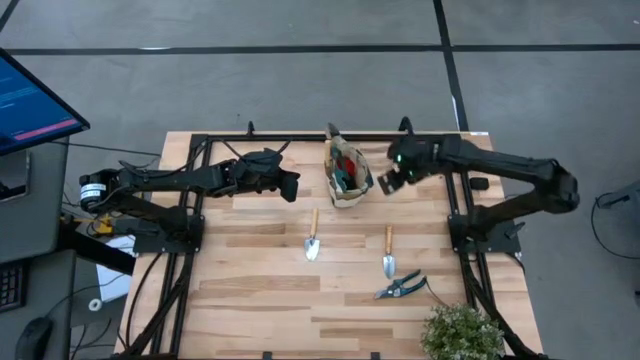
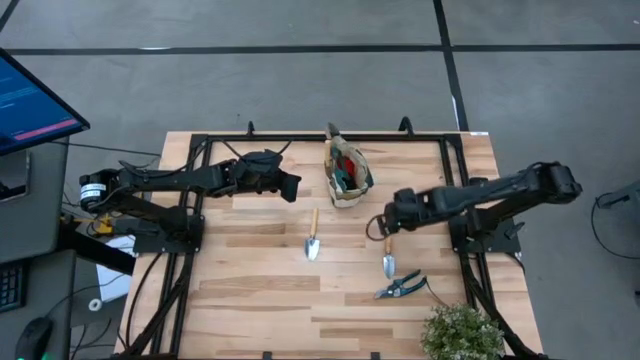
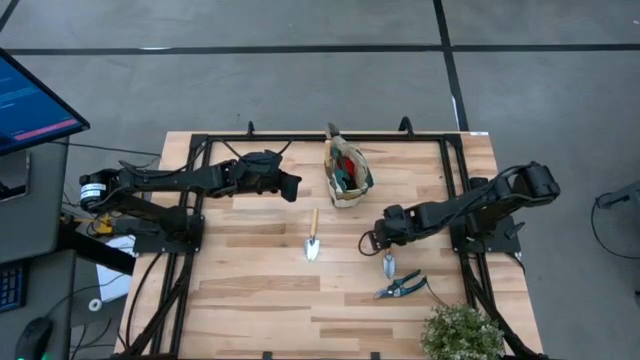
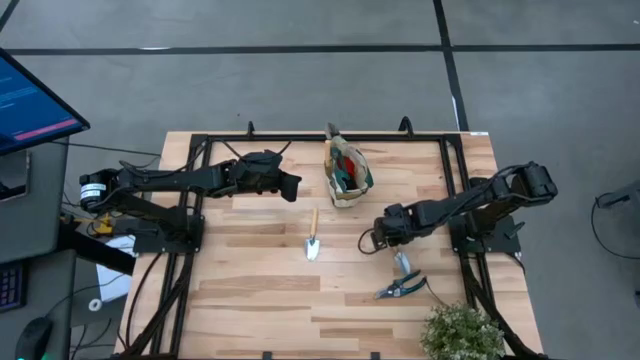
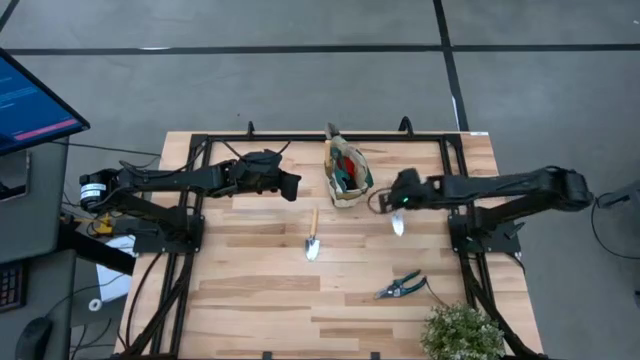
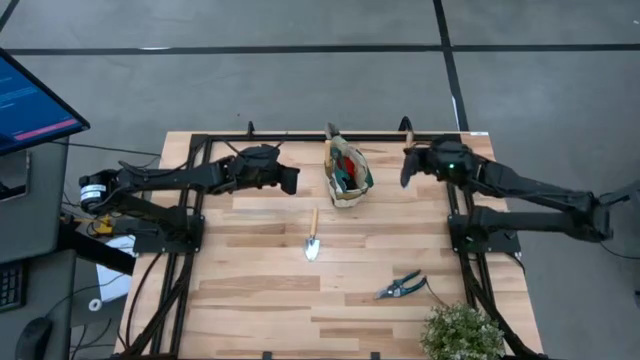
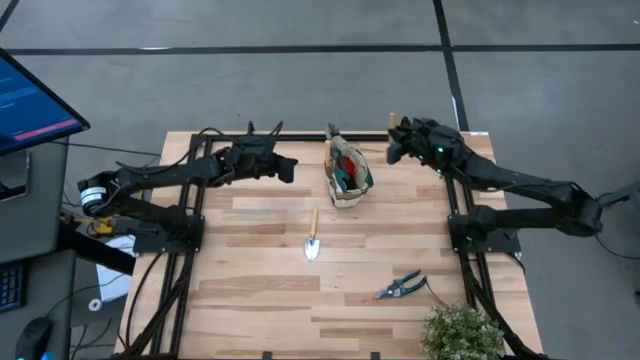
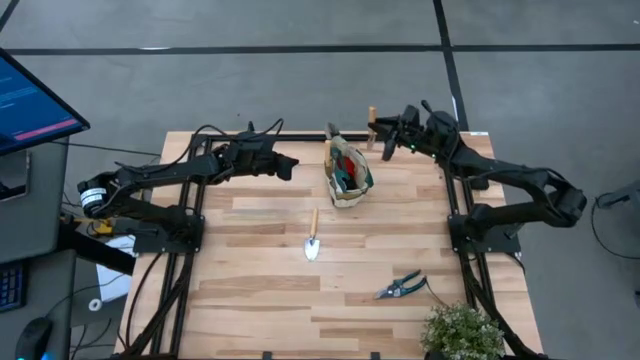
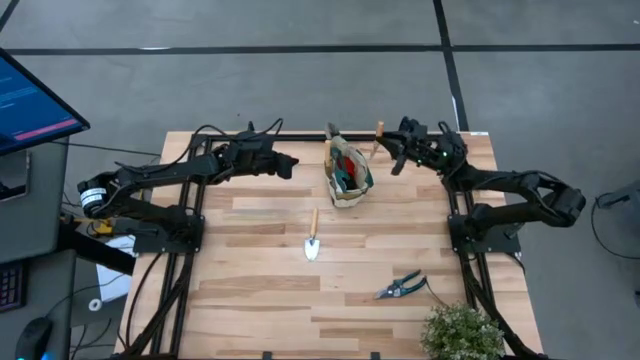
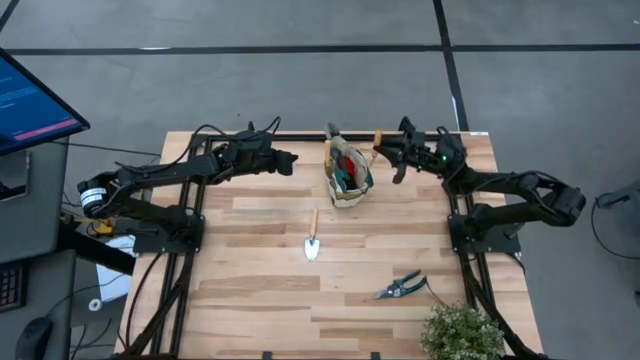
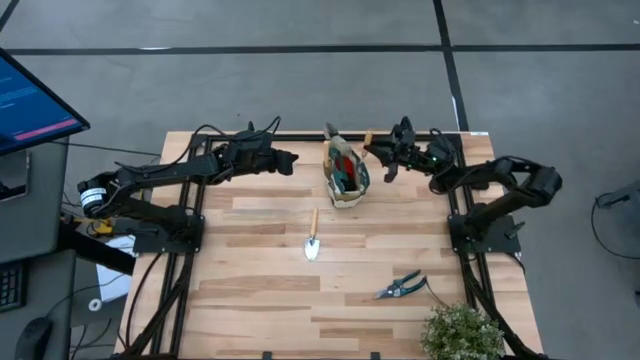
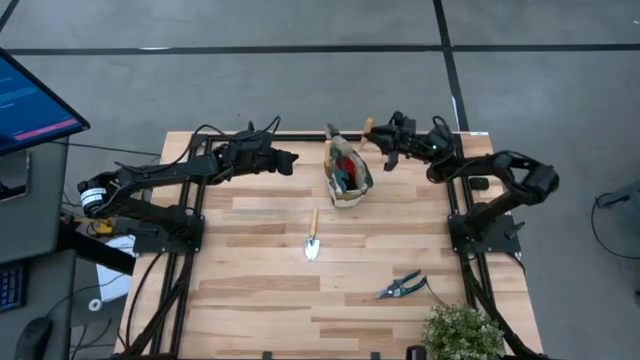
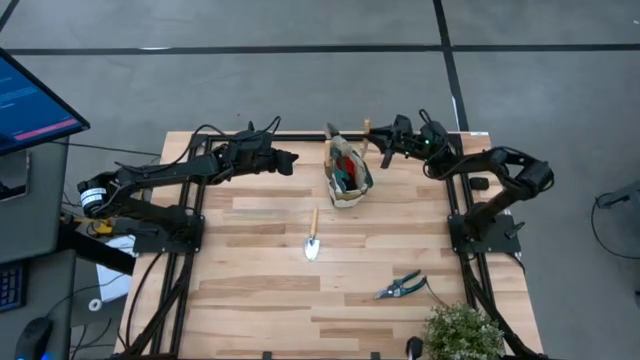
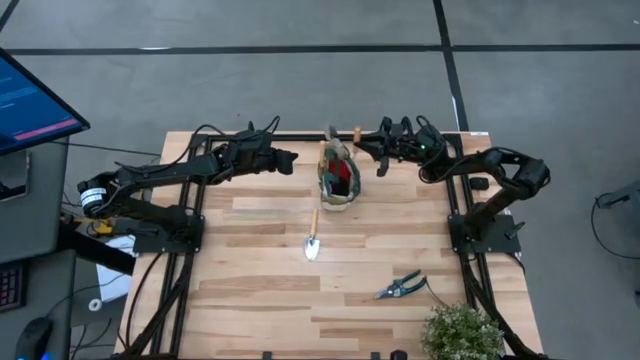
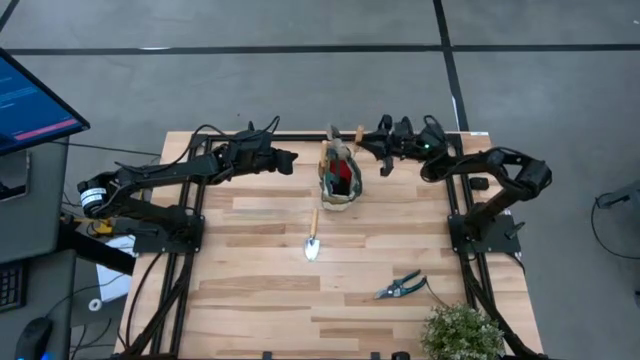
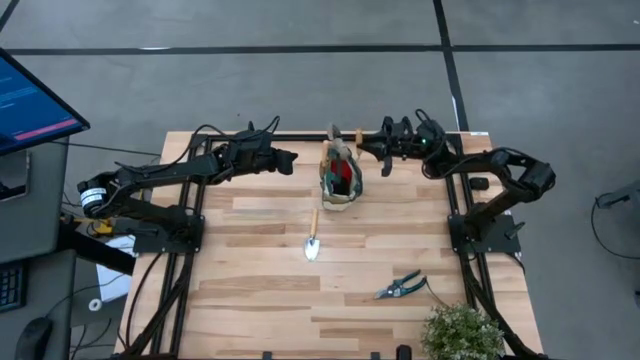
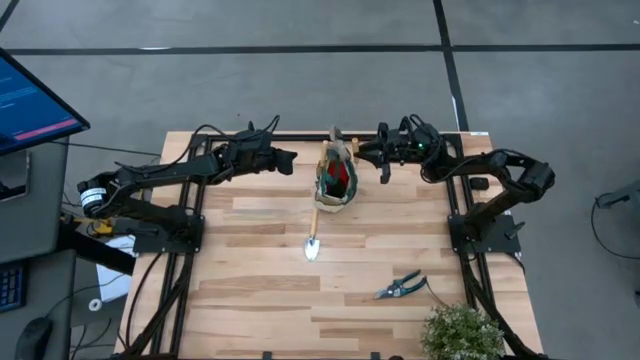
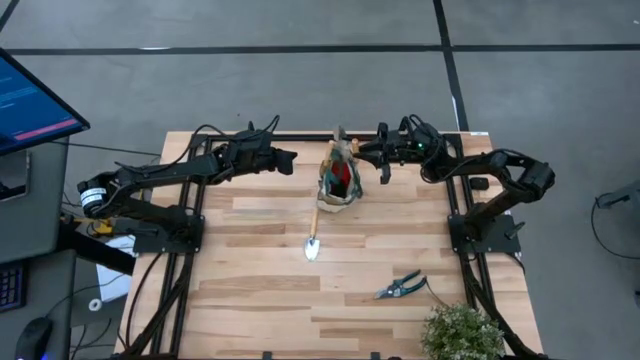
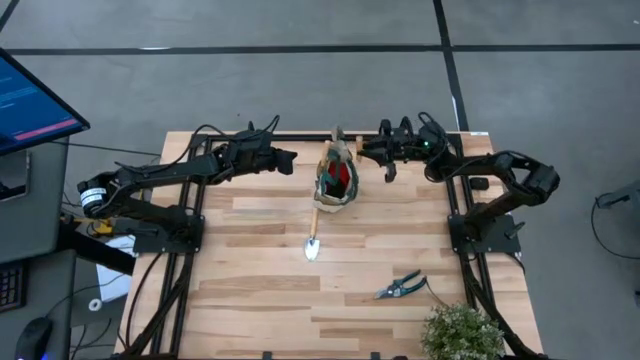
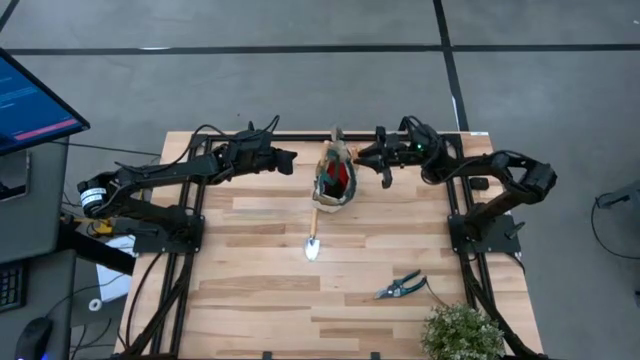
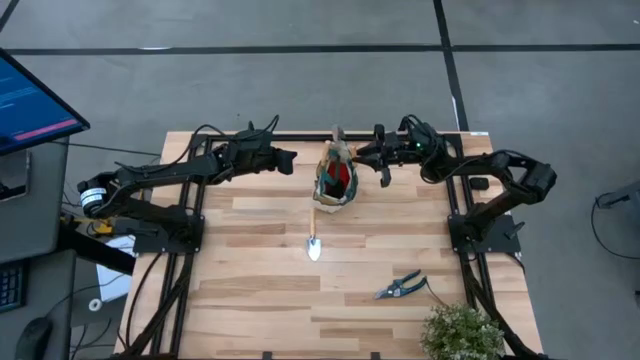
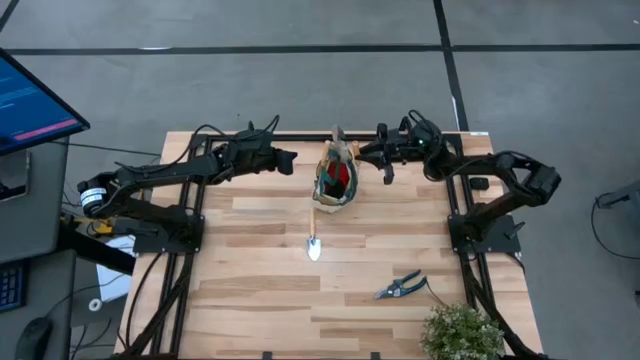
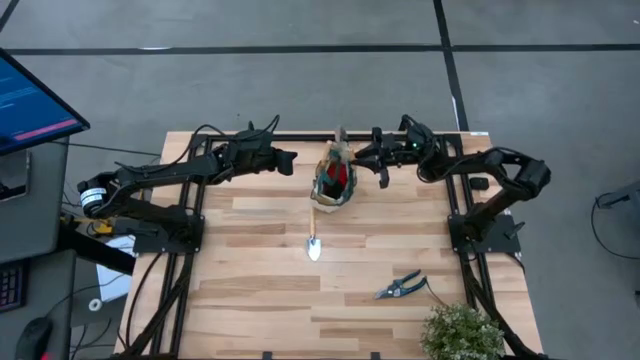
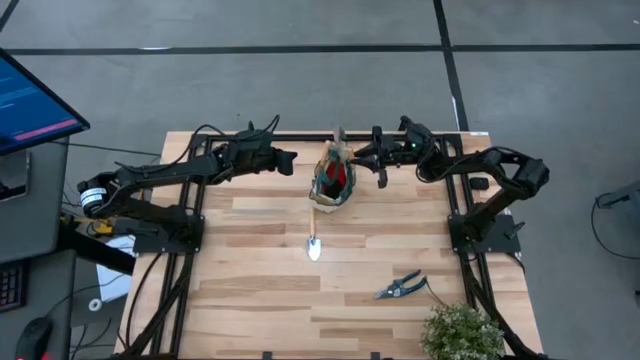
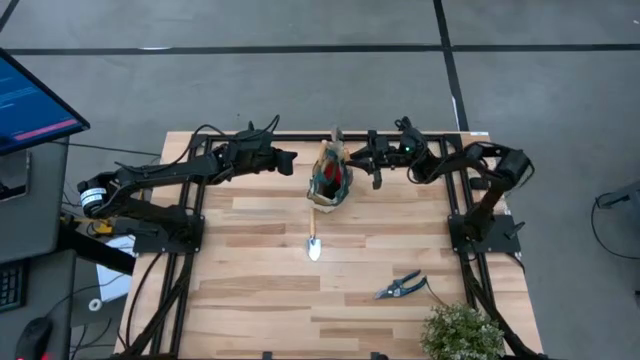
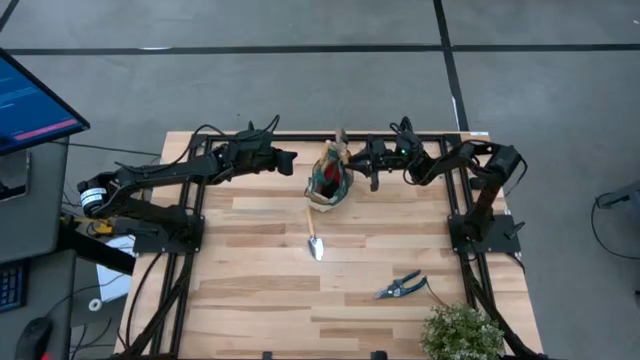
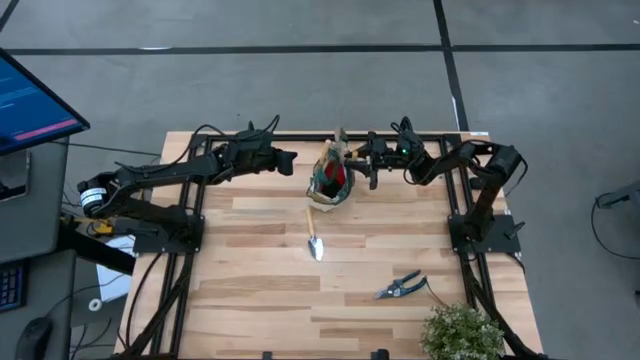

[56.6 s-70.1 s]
Task: Pick & Place Garden tools in Gardening bag
Put the brown trowel into the gardening bag

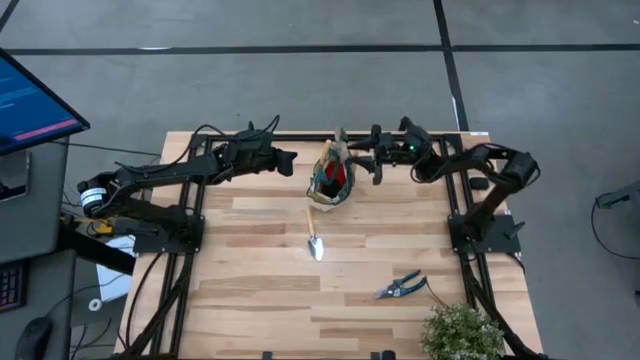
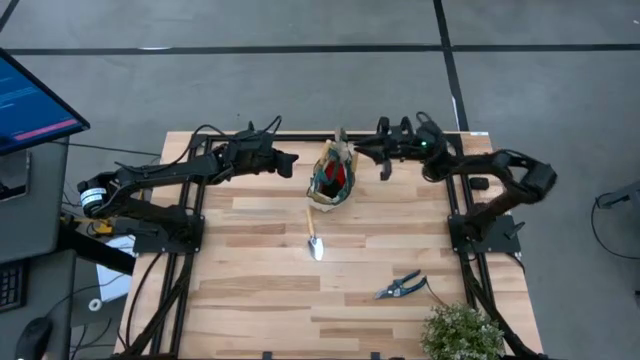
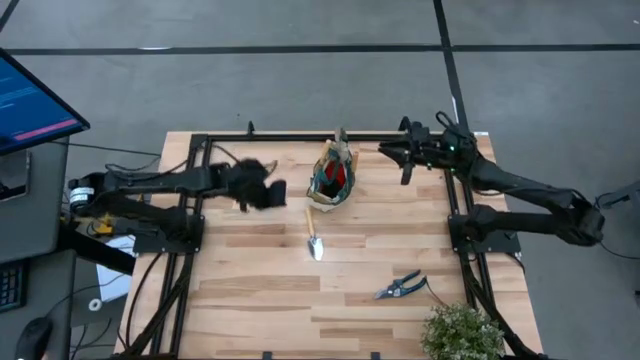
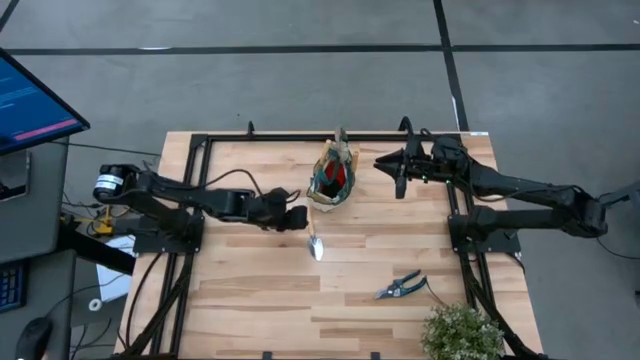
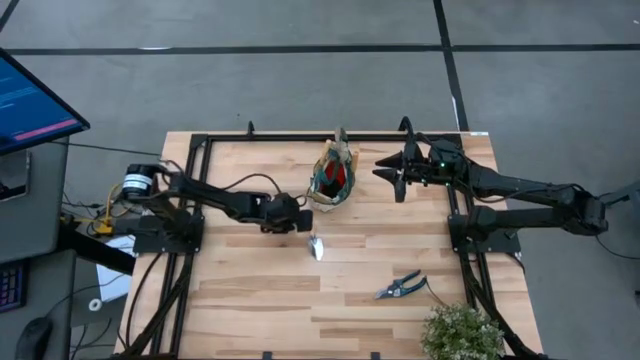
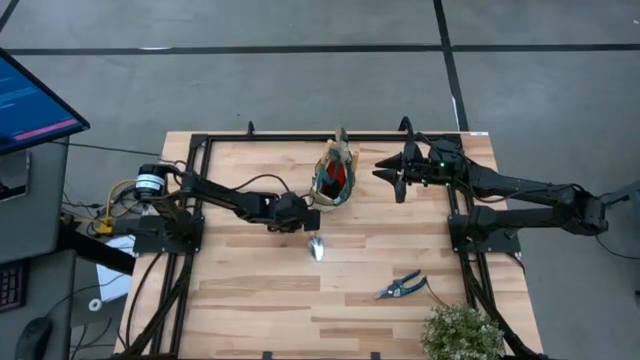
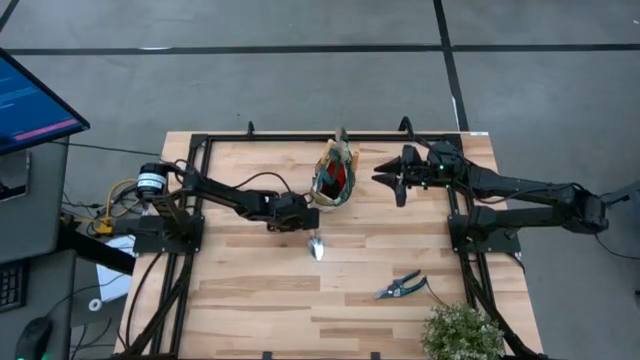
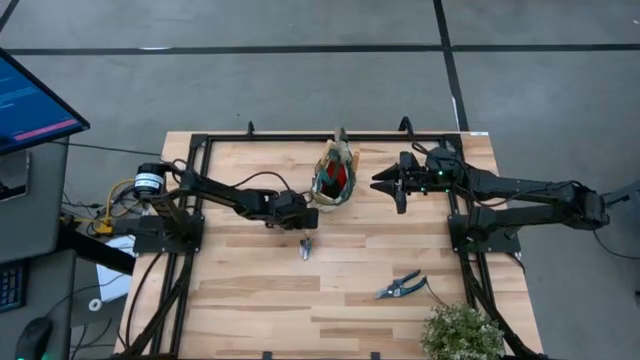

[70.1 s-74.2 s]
Put the brown trowel into the gardening bag

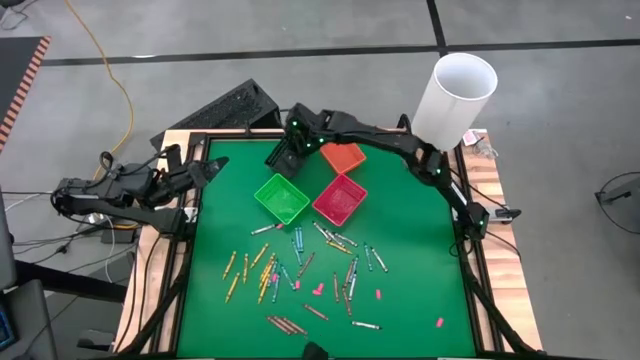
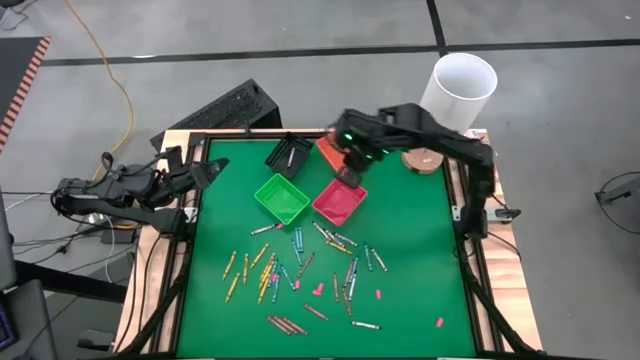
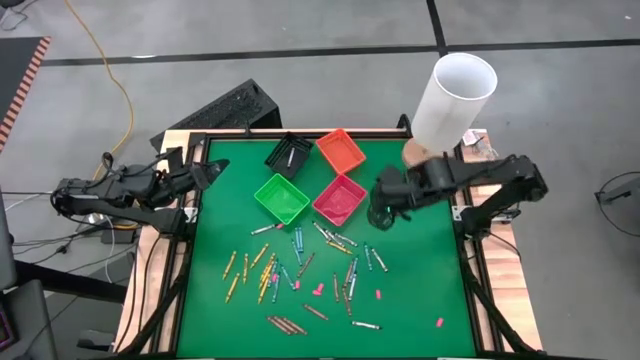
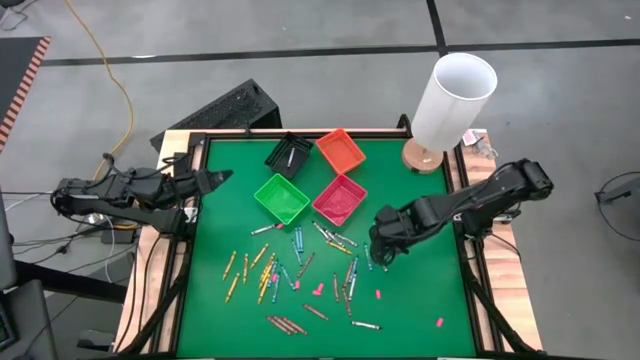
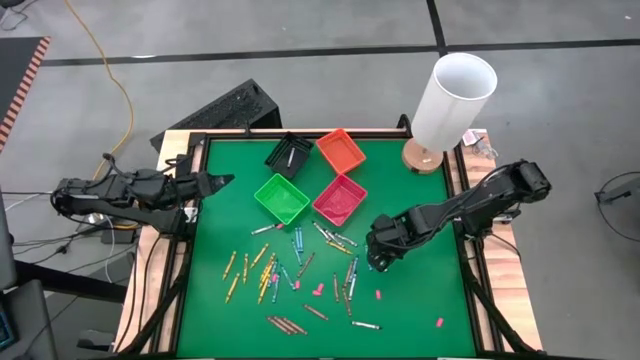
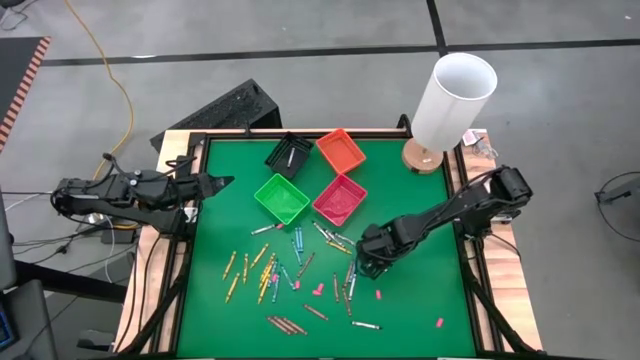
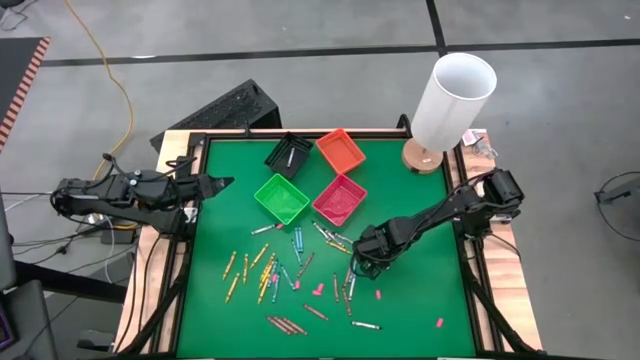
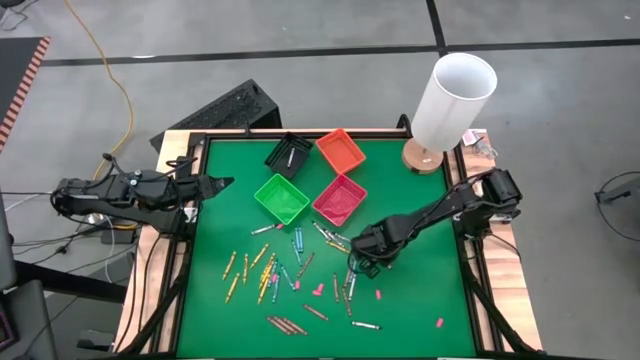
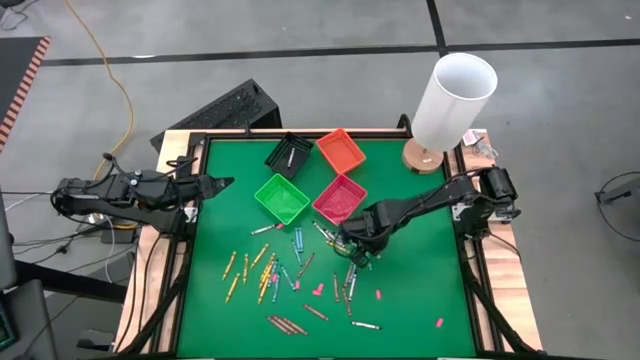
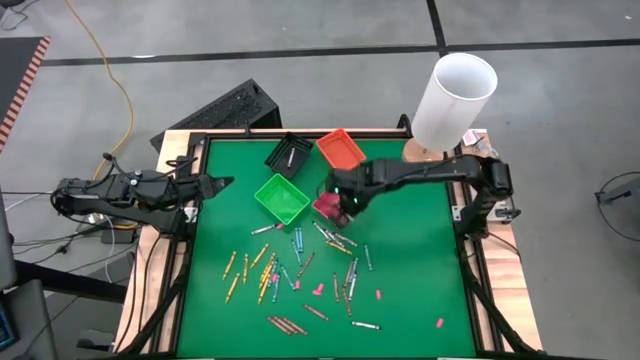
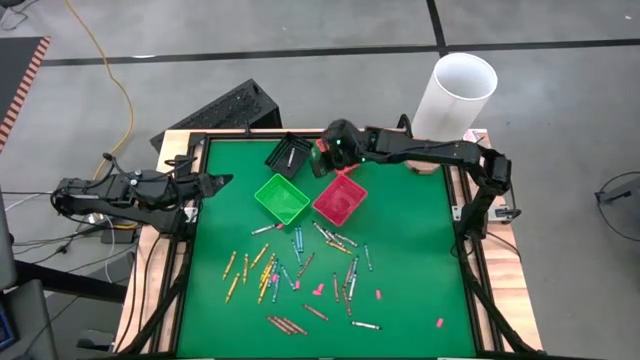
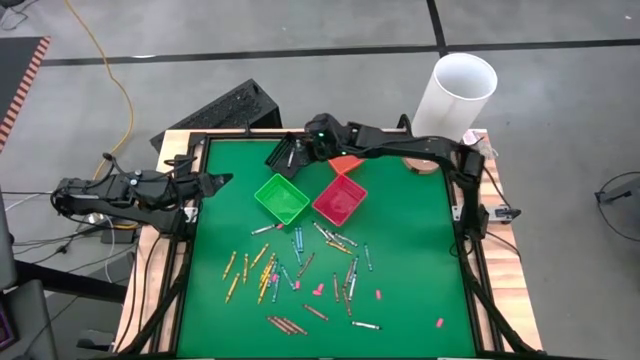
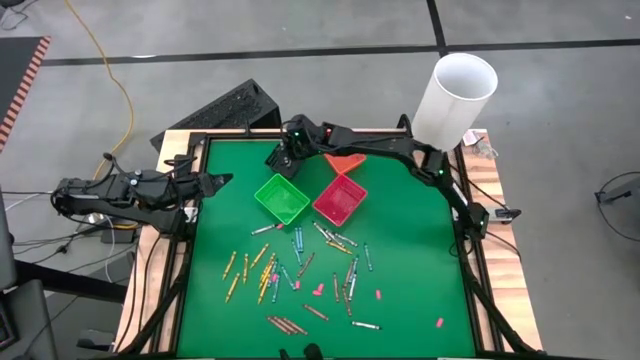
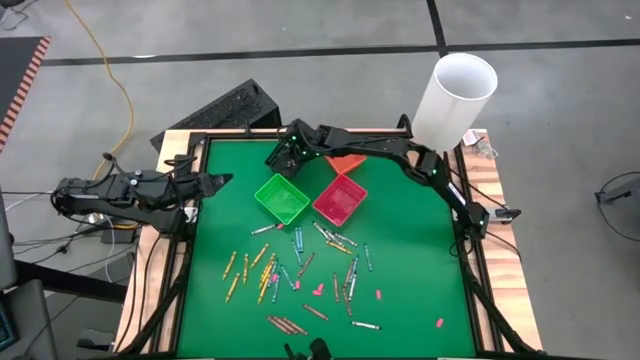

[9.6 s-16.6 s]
Task: Sort crayons
Put the black crayon into the black bin
